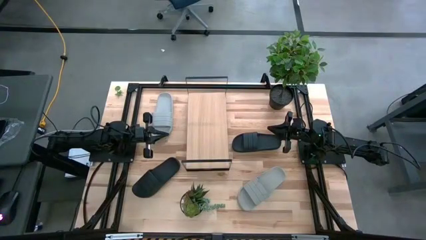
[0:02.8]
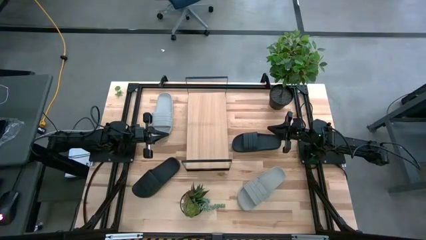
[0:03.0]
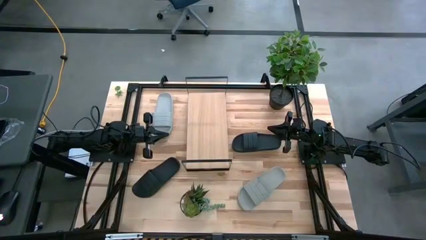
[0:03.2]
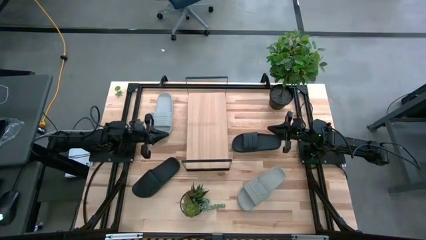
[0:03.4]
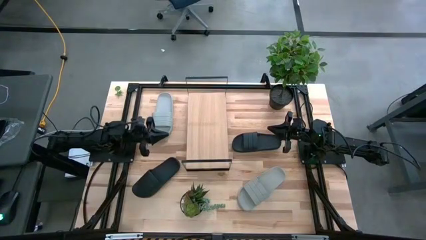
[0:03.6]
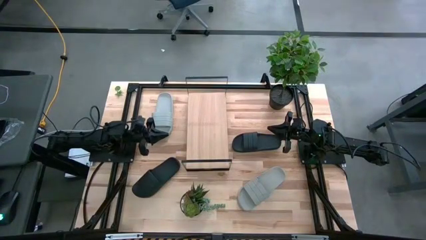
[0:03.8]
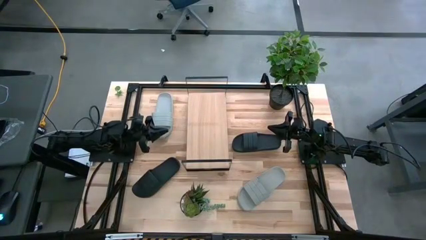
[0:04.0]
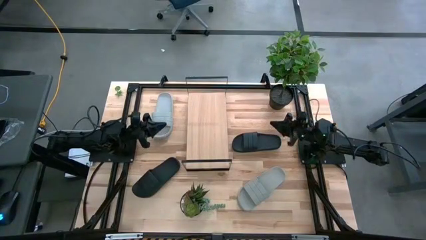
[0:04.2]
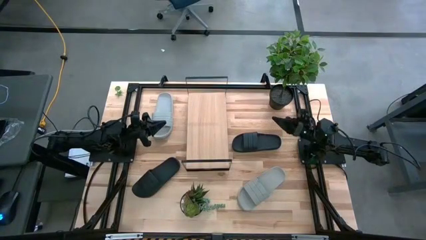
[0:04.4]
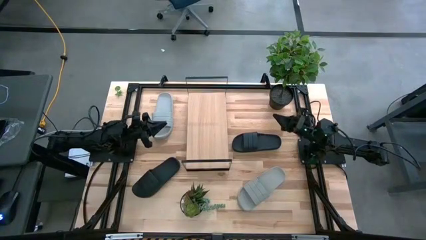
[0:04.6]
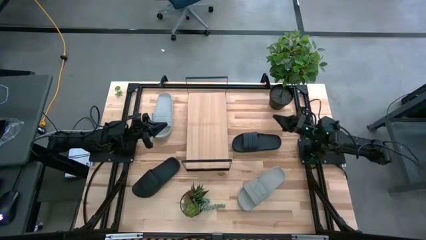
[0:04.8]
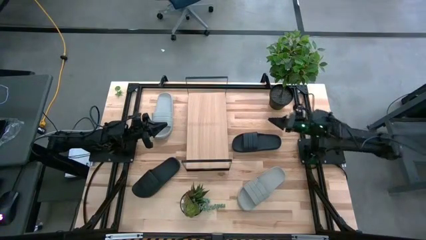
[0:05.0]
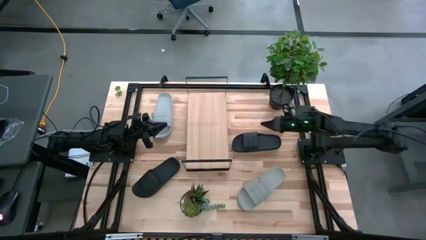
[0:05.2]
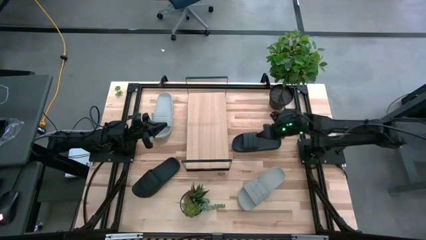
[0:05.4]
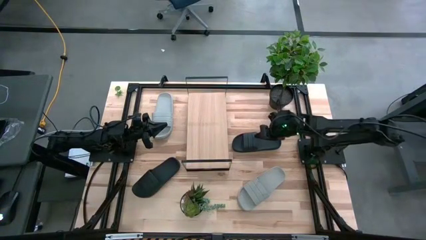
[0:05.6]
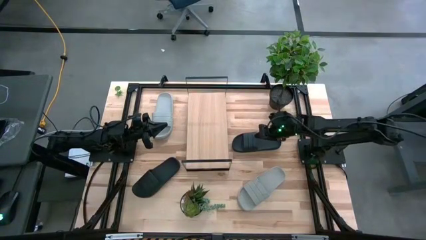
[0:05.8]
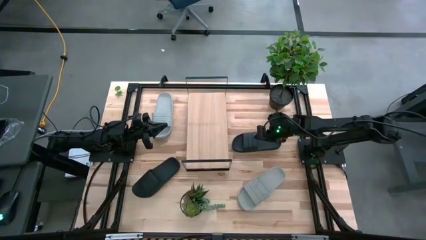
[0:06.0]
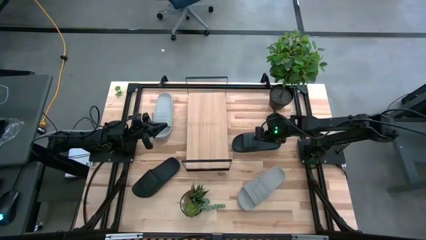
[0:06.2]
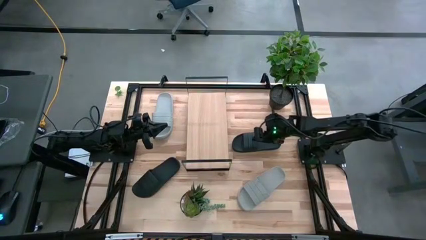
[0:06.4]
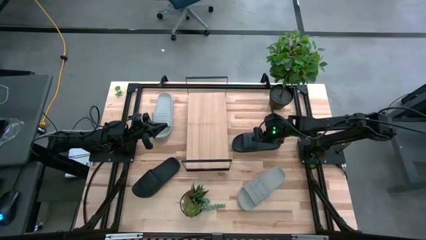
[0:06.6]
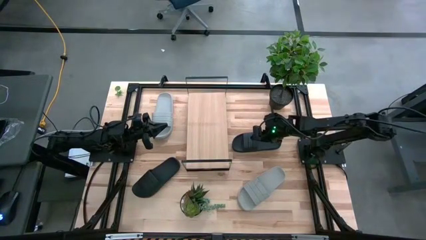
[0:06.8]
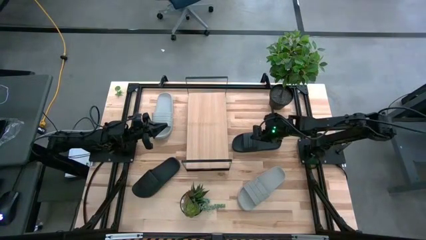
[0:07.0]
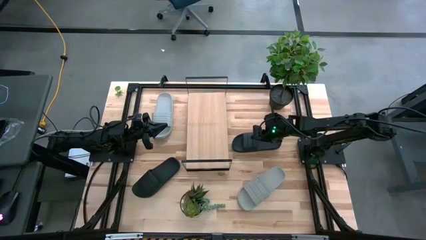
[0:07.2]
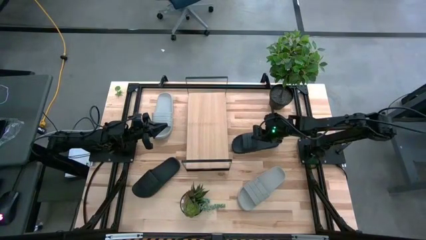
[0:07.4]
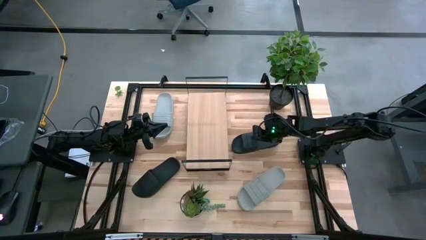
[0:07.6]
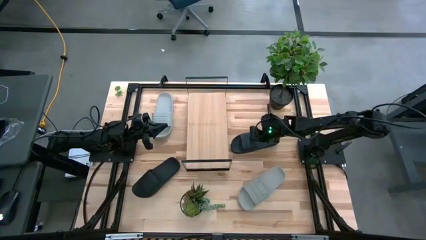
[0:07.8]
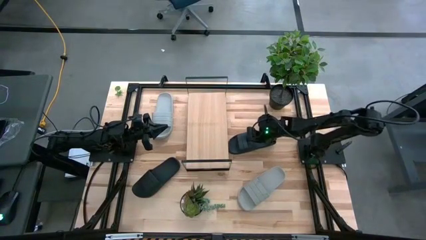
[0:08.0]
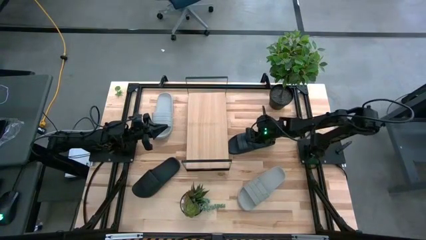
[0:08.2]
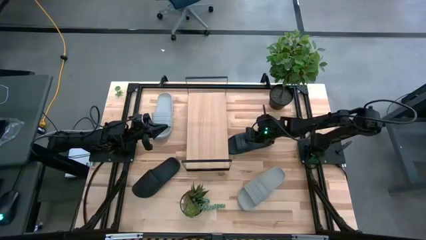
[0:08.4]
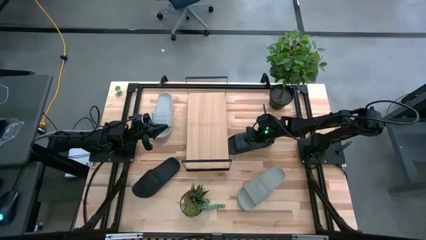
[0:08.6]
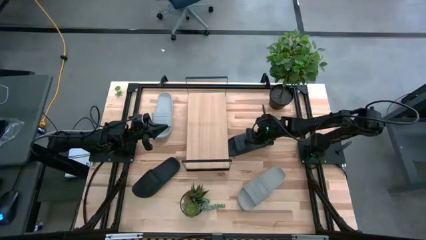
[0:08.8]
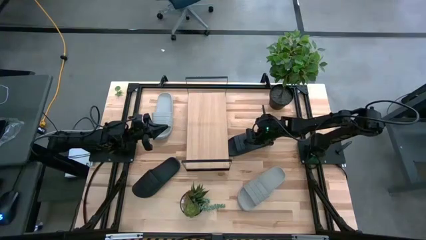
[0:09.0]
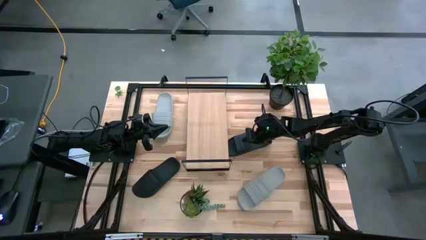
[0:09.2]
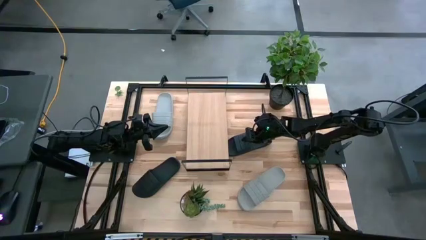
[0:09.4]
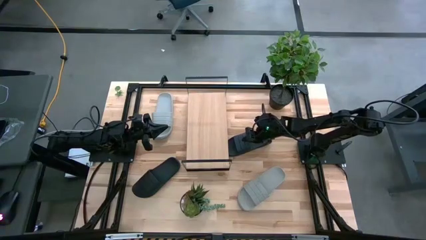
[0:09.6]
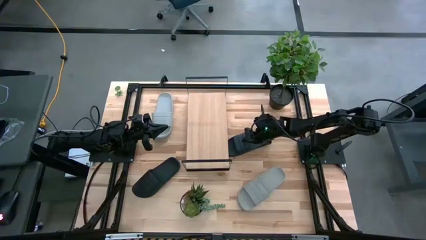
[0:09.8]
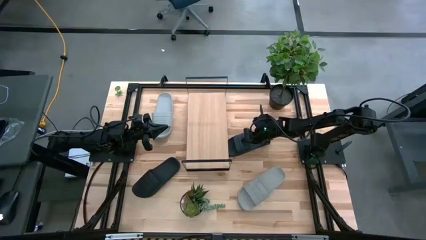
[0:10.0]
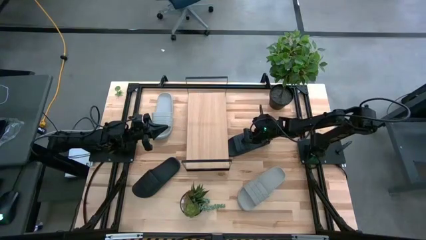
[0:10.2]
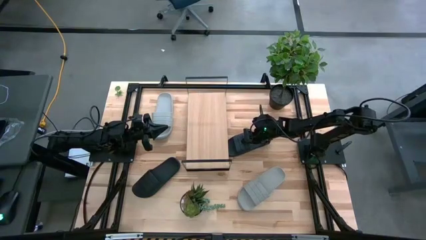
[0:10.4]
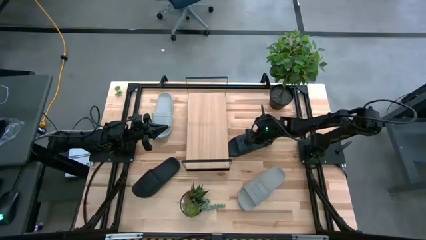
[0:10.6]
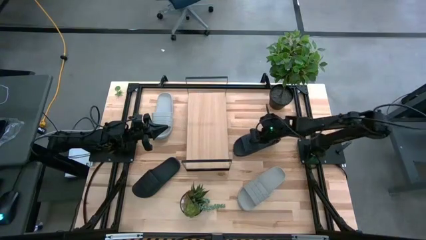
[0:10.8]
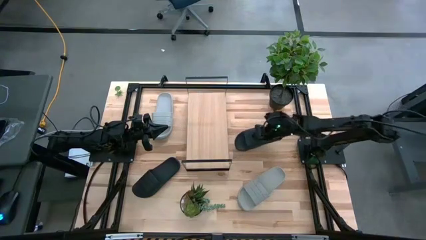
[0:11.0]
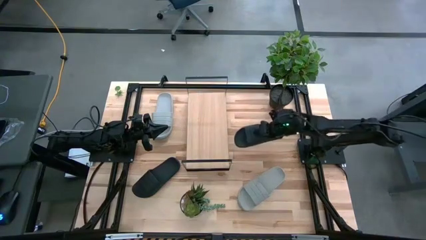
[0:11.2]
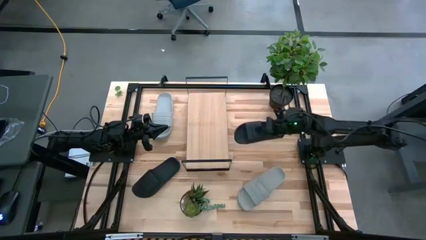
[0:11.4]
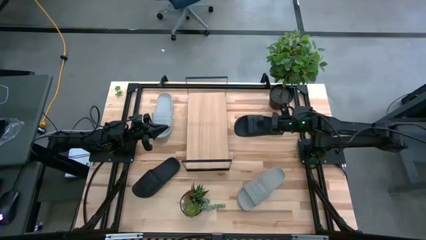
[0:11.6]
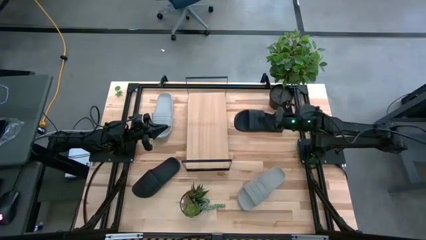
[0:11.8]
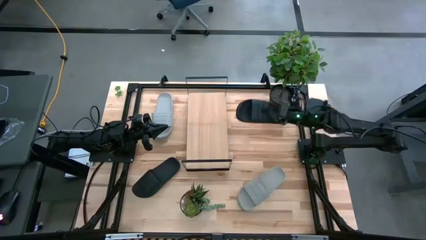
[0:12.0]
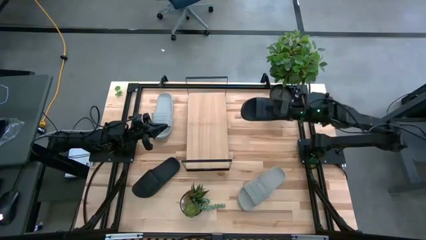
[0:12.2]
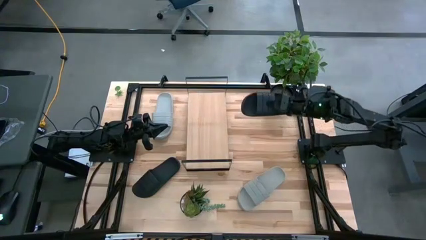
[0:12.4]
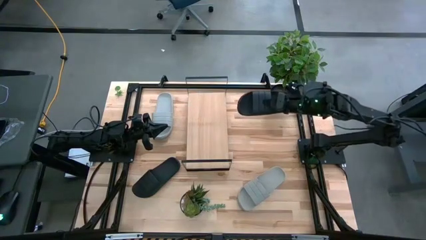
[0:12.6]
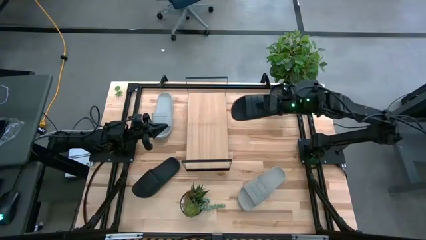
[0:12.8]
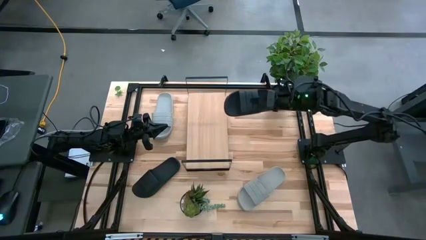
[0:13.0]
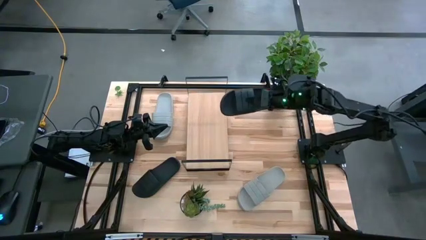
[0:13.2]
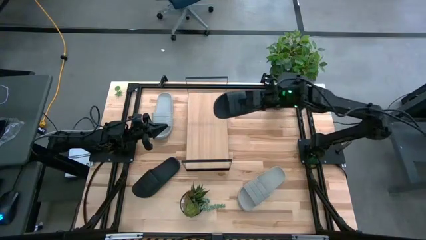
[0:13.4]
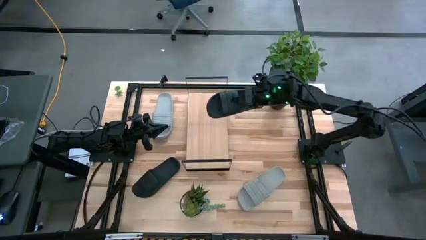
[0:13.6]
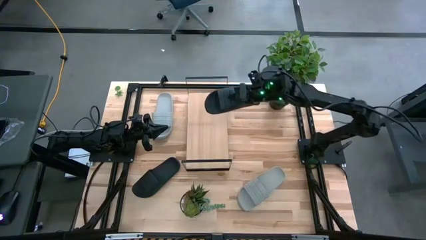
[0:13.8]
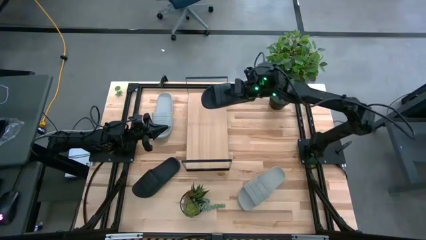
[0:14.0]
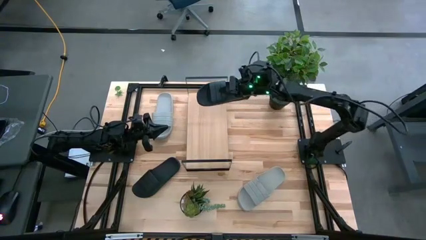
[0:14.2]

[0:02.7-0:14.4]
Task: Pick and place slides into the shelf
Put the right black slipper slide on the shelf
